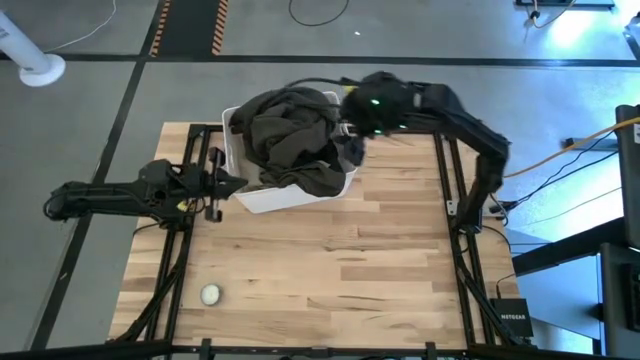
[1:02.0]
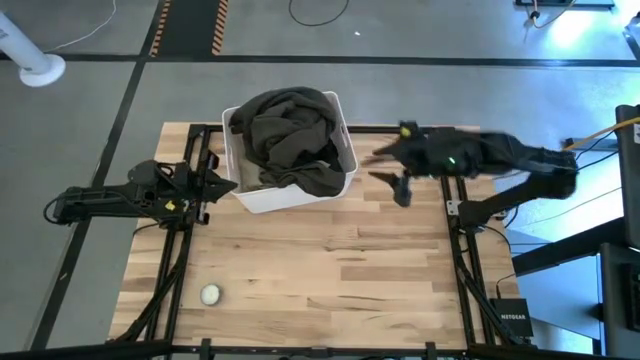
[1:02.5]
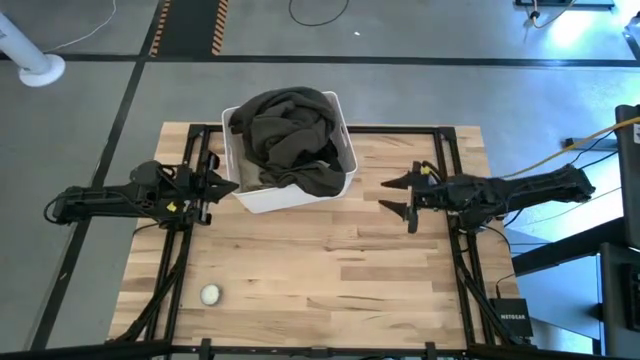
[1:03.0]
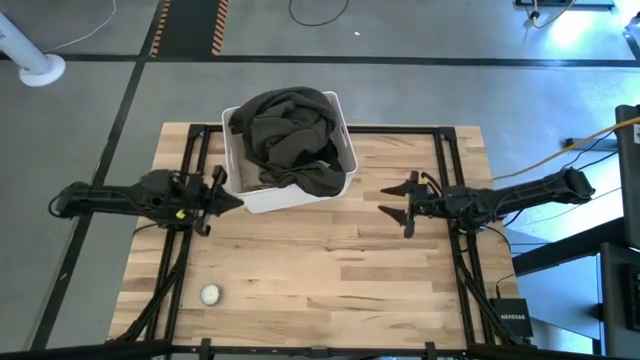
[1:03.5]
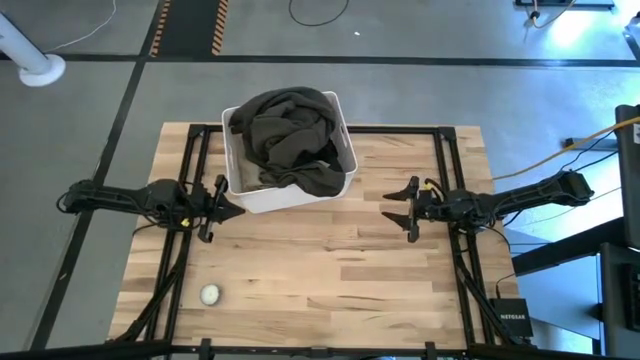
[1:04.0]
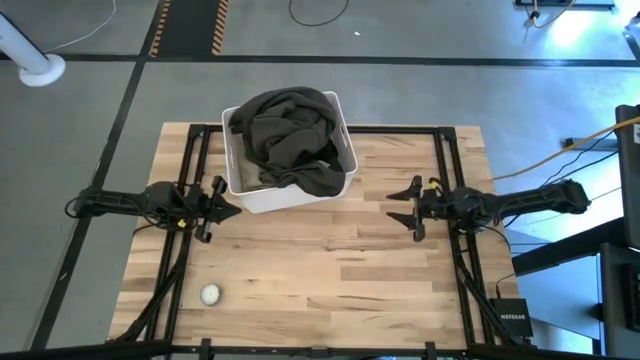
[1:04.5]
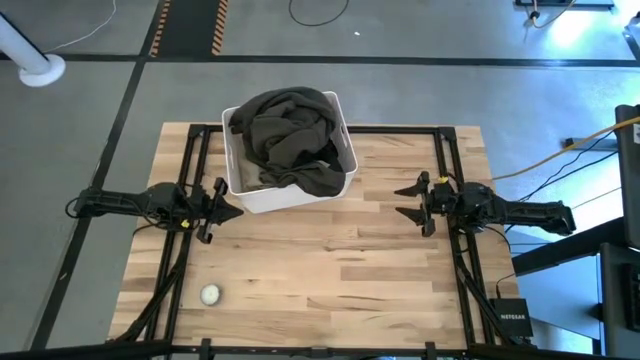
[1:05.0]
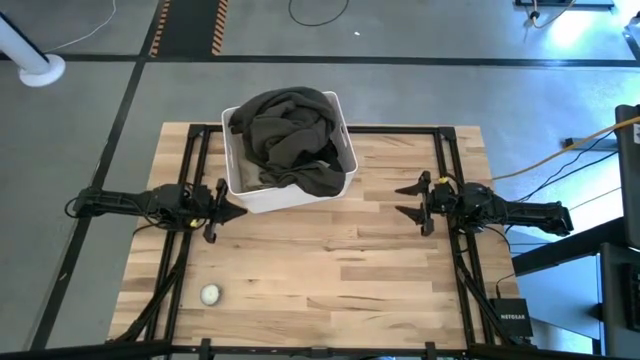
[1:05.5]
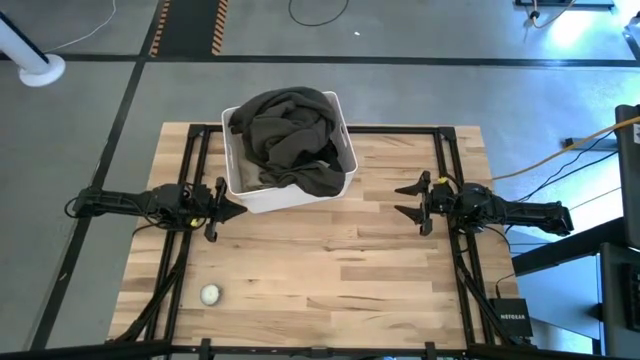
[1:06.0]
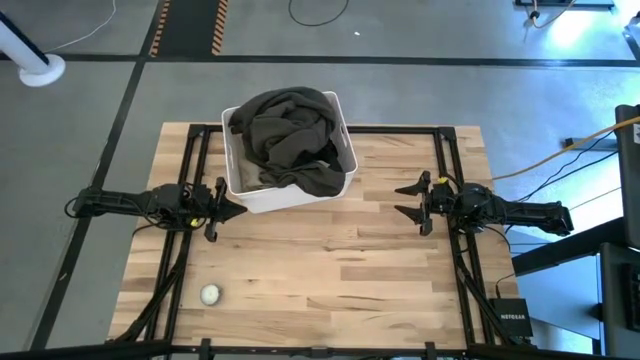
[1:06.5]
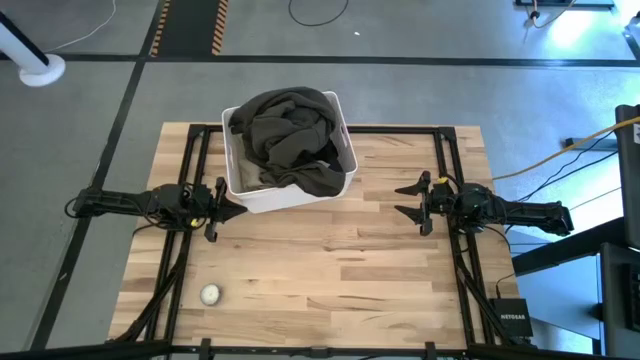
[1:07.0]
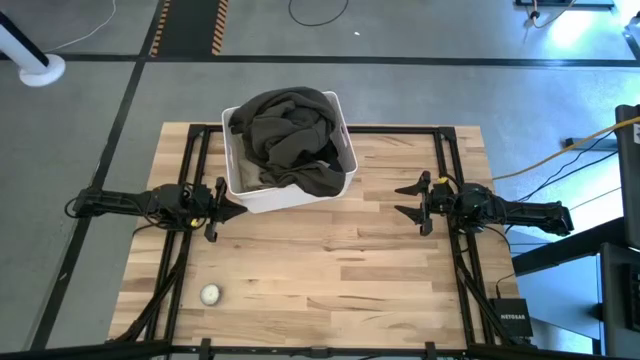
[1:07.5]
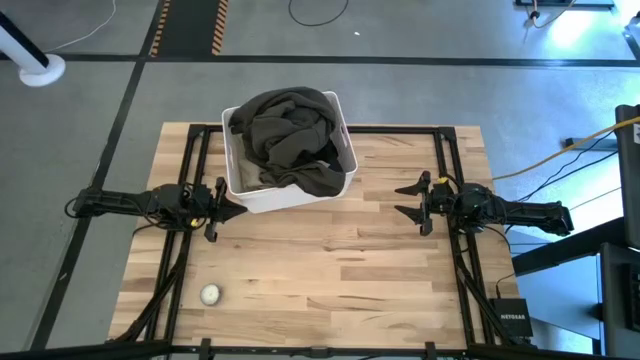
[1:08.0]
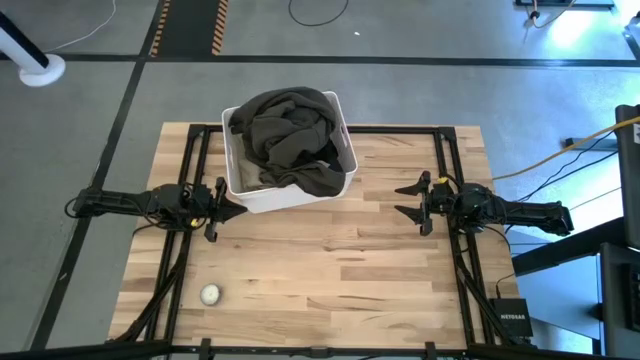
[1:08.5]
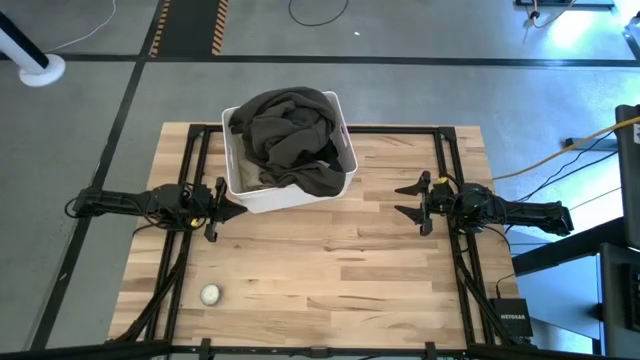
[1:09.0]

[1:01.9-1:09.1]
Task: Sort clothes
Return to Home Position

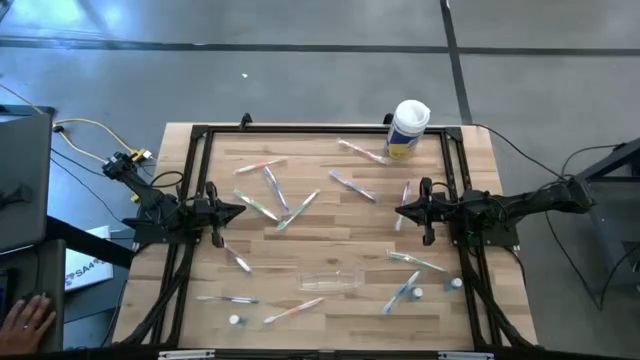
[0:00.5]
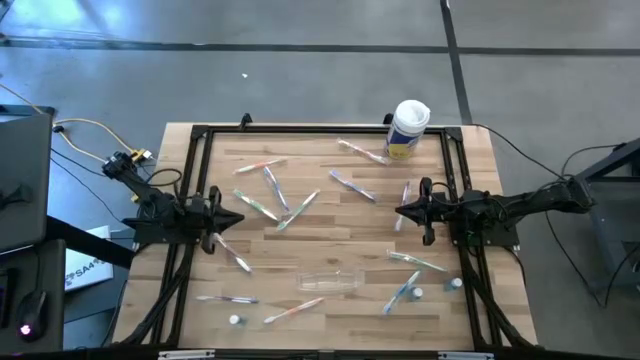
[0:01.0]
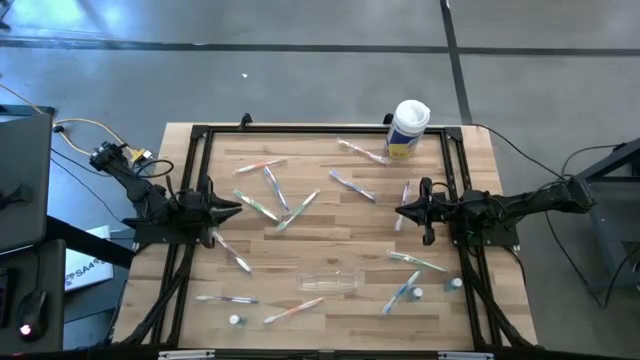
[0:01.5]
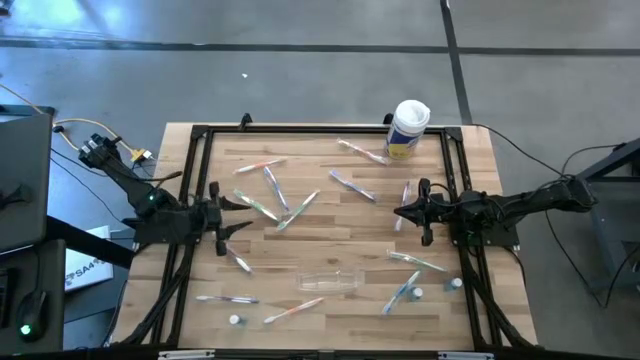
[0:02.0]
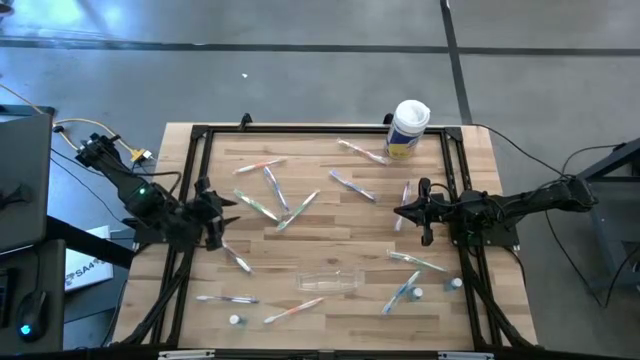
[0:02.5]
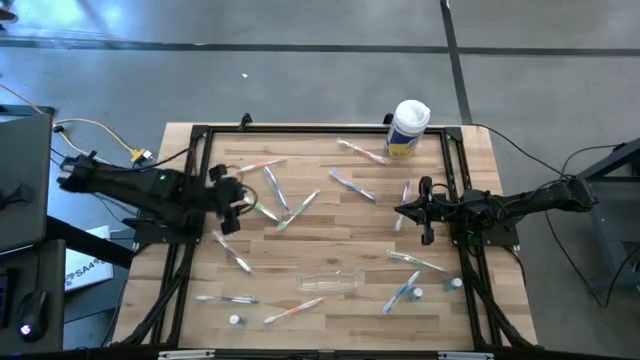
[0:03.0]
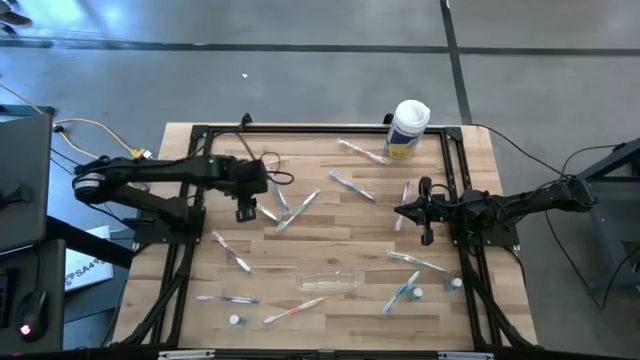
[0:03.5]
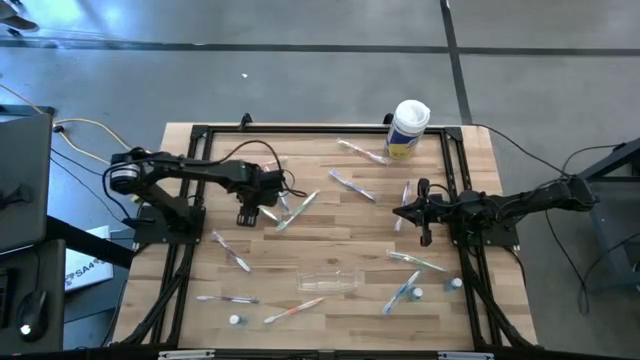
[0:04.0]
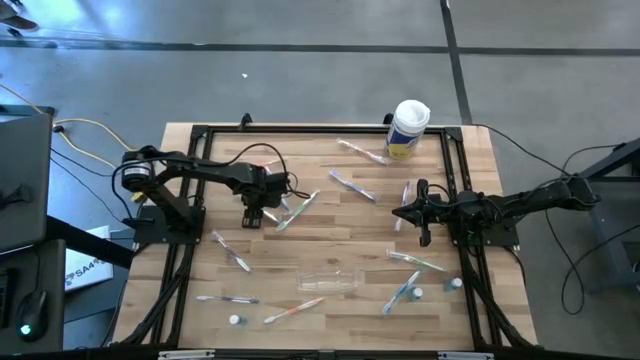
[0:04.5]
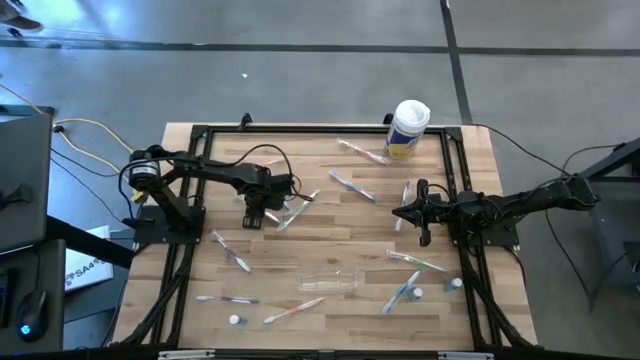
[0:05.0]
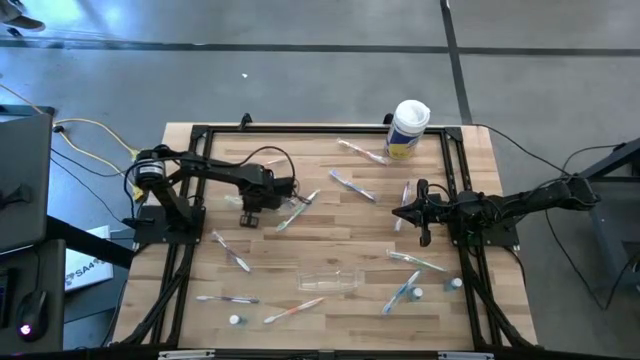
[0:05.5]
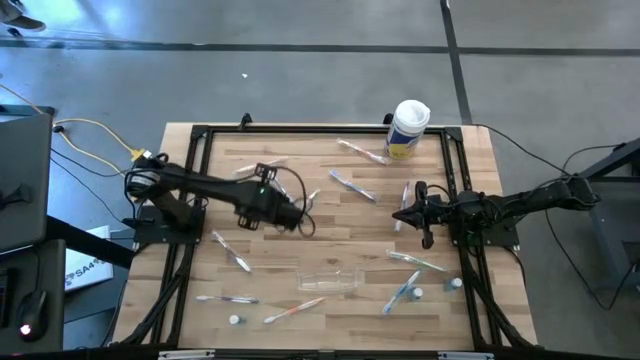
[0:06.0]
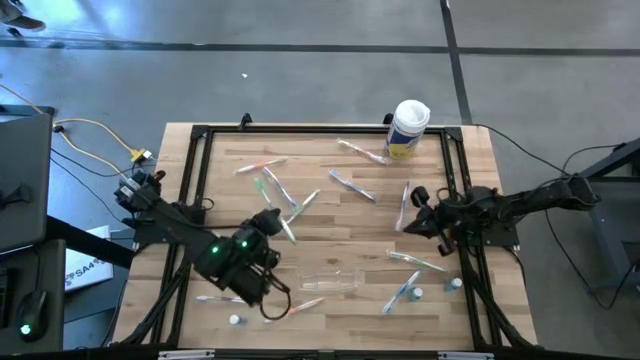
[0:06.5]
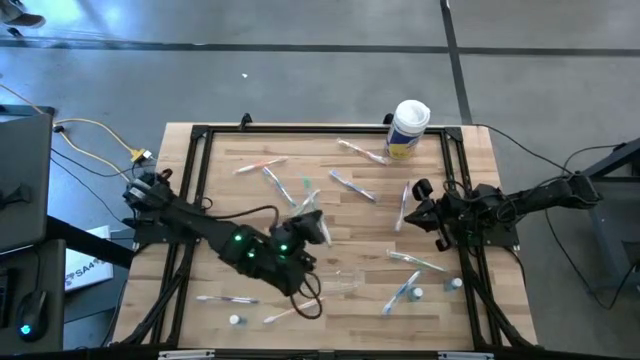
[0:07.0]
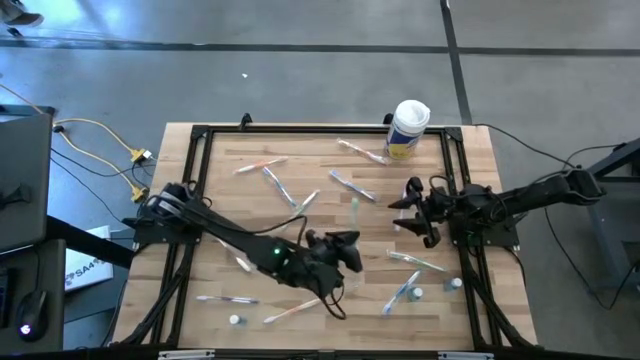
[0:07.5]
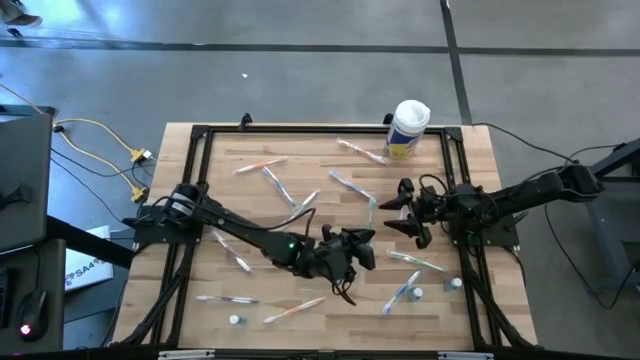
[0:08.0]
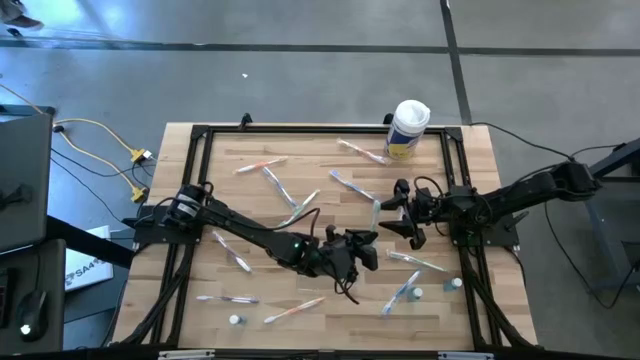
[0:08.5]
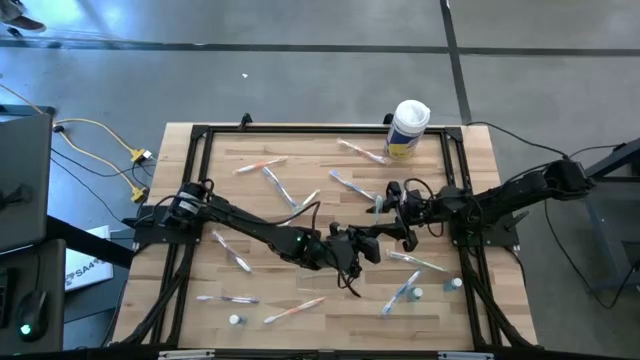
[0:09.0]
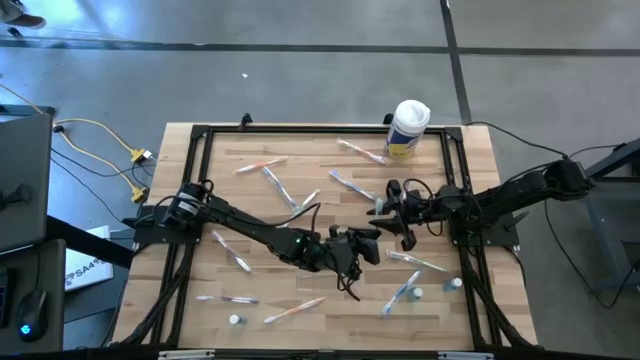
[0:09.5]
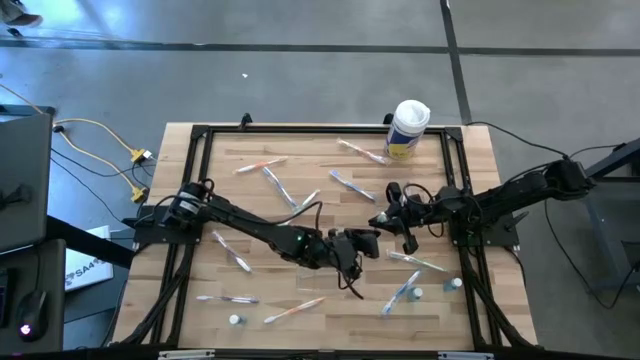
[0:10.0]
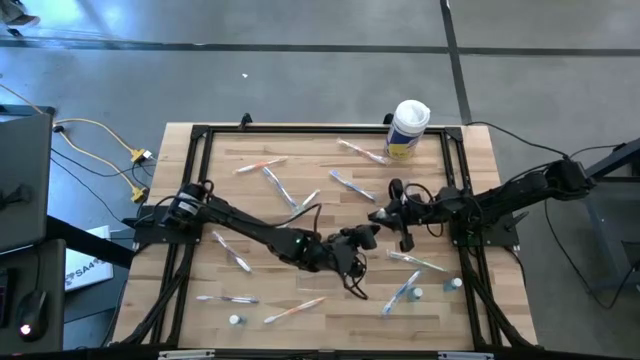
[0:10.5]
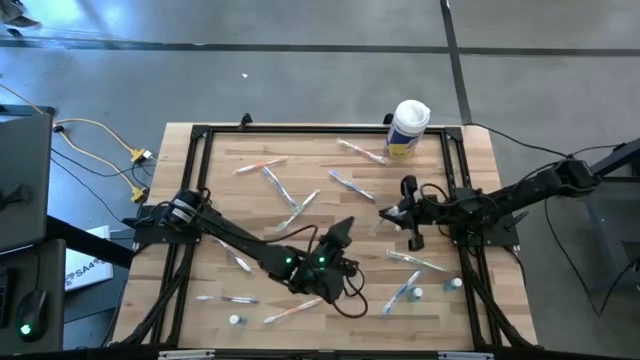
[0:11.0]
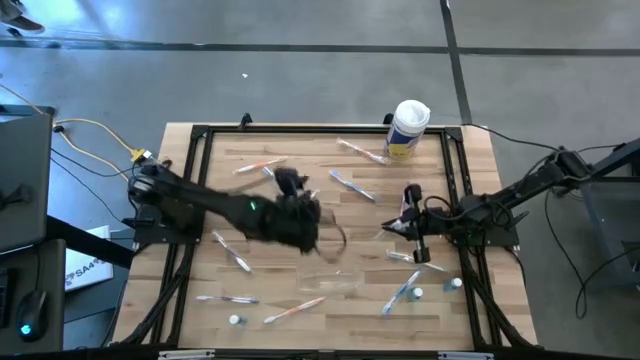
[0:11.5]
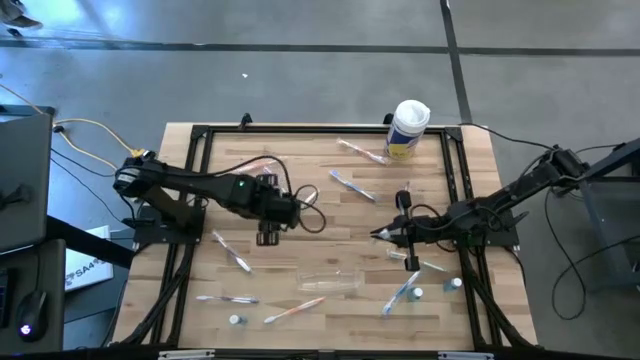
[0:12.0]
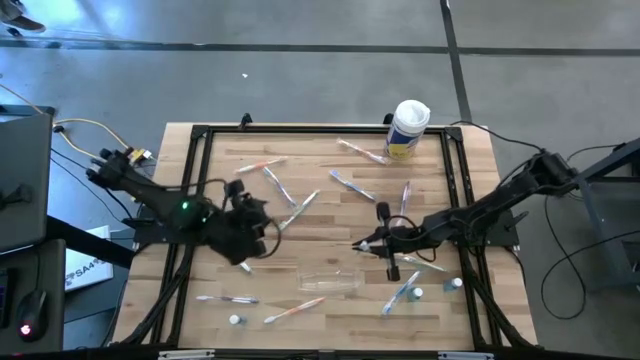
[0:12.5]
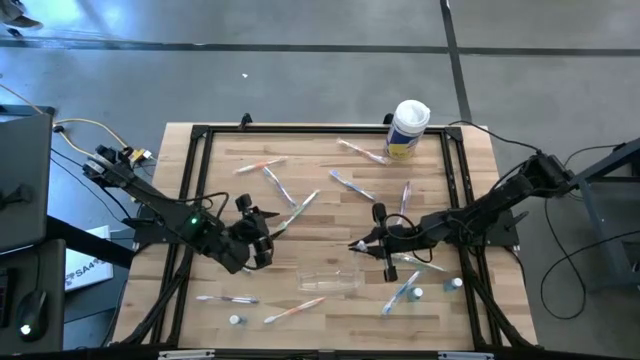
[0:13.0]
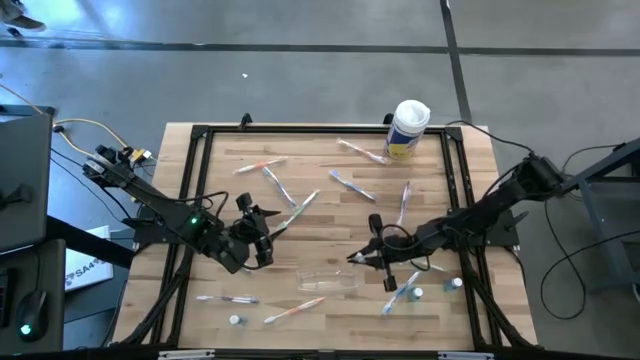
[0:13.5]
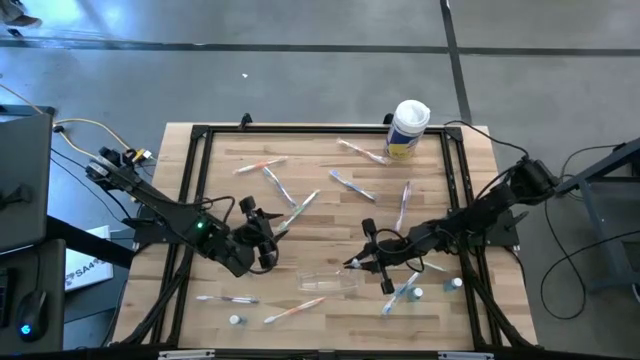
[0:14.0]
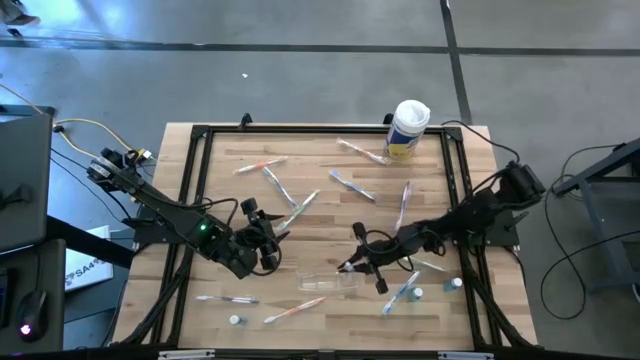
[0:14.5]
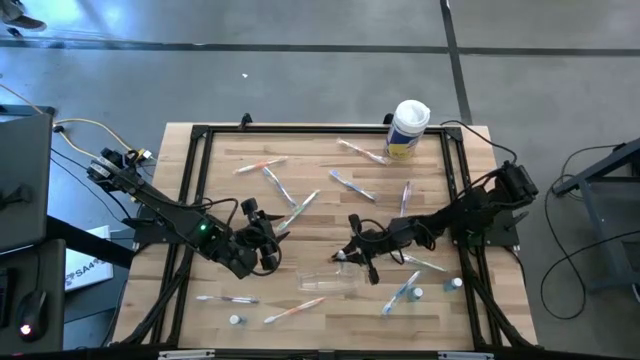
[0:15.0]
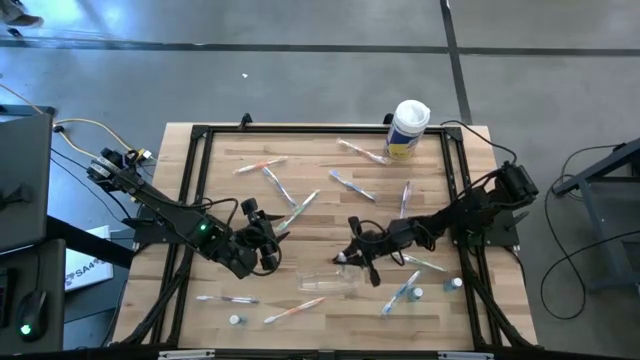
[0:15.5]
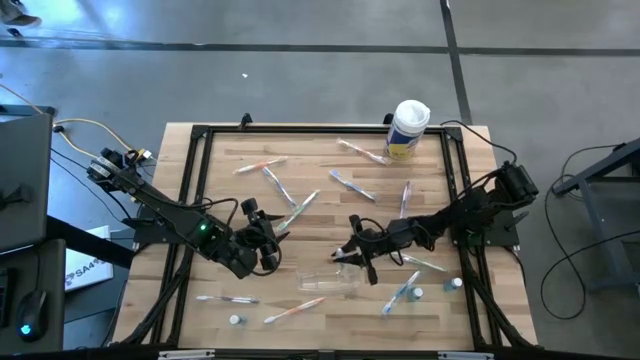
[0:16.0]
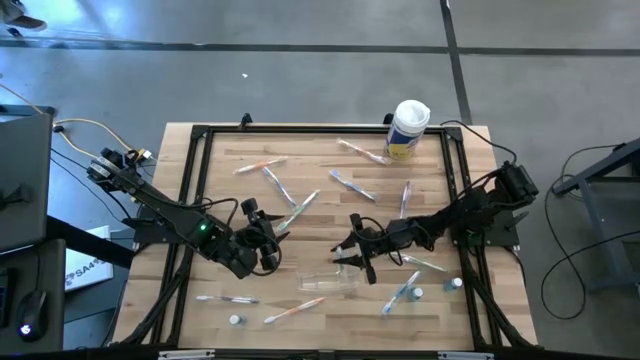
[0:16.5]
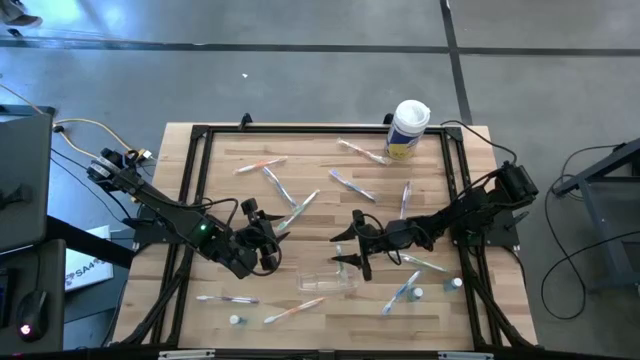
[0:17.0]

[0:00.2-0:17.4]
Task: Pick & Place toothbrushing station
Put the top left green toothbrush into the transparent organizer
